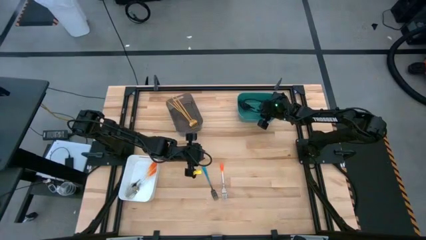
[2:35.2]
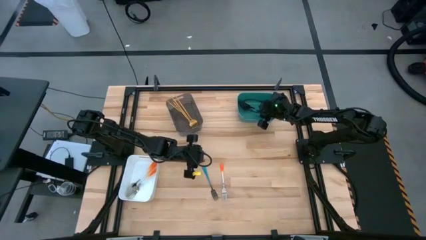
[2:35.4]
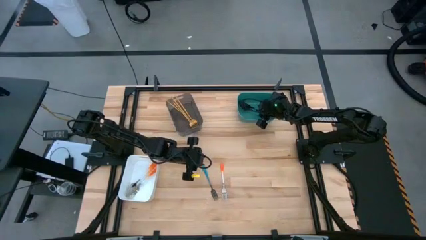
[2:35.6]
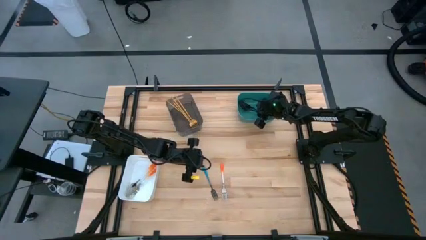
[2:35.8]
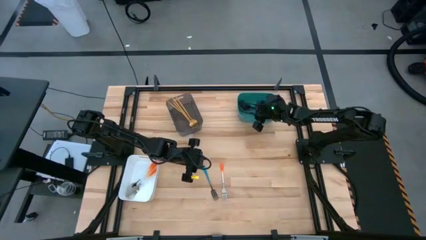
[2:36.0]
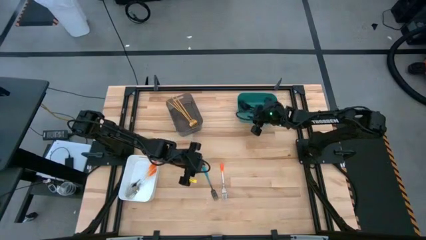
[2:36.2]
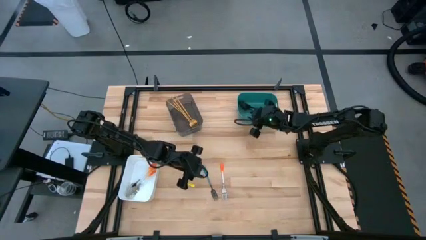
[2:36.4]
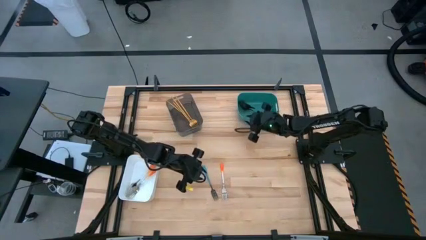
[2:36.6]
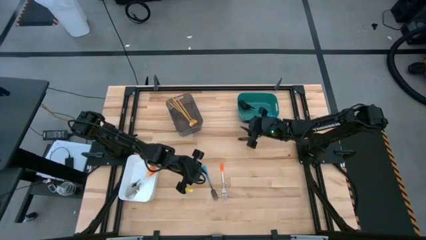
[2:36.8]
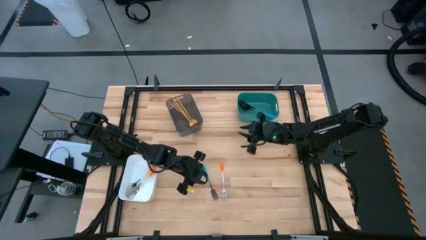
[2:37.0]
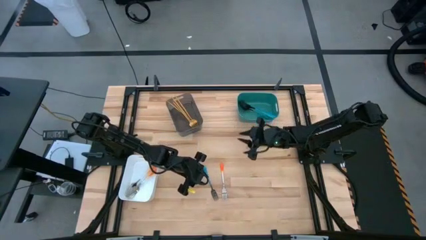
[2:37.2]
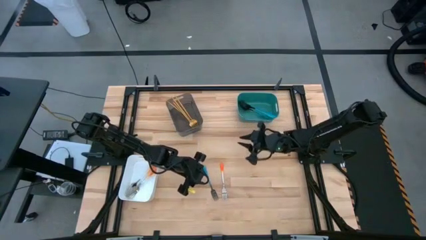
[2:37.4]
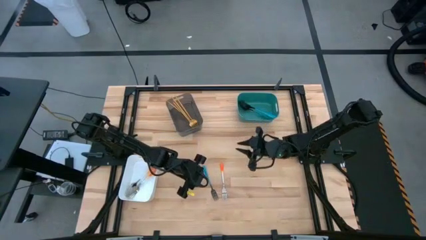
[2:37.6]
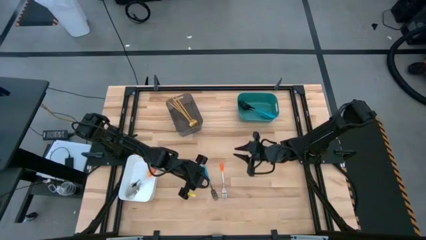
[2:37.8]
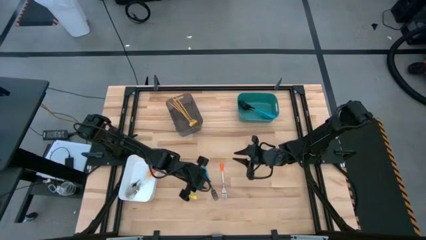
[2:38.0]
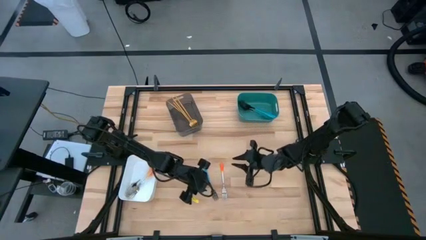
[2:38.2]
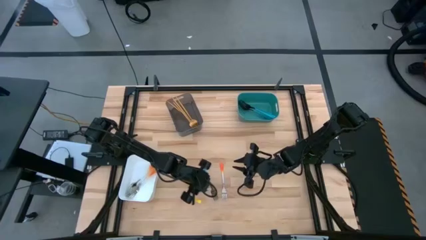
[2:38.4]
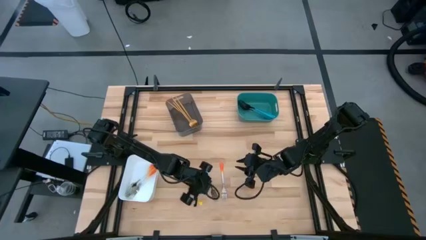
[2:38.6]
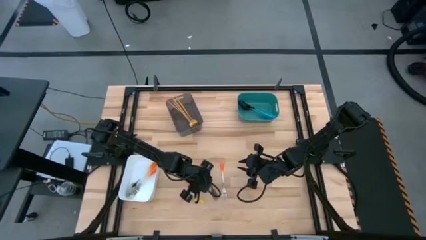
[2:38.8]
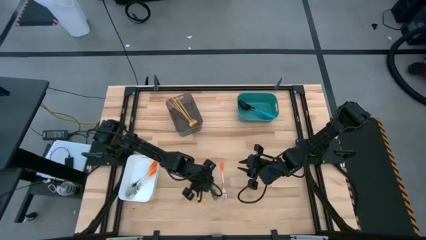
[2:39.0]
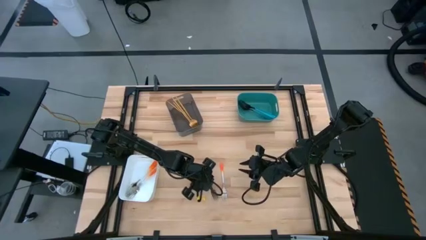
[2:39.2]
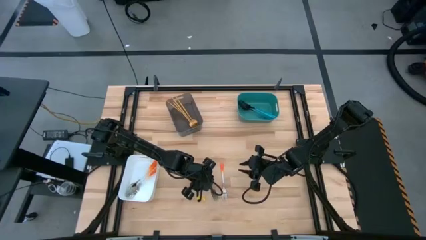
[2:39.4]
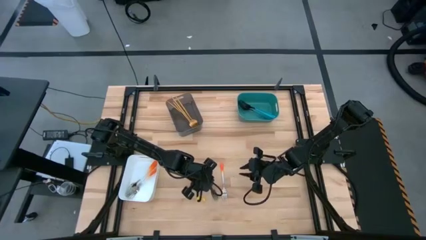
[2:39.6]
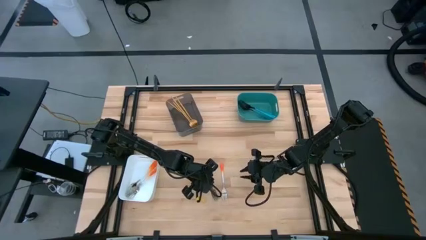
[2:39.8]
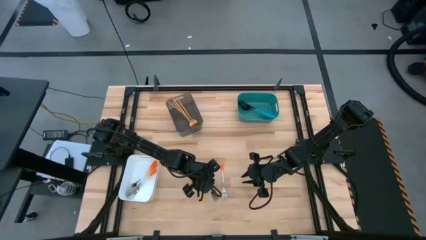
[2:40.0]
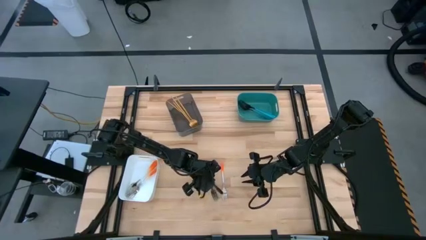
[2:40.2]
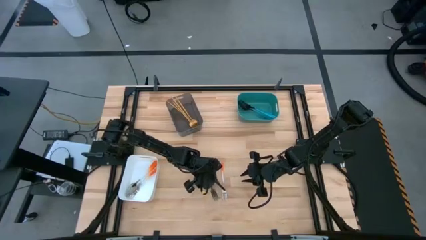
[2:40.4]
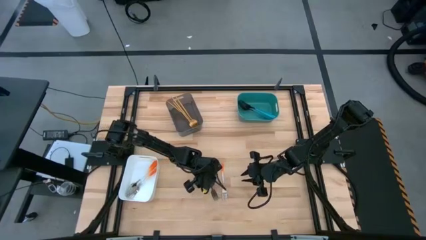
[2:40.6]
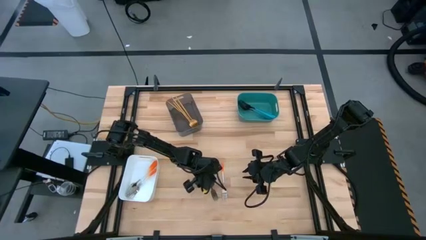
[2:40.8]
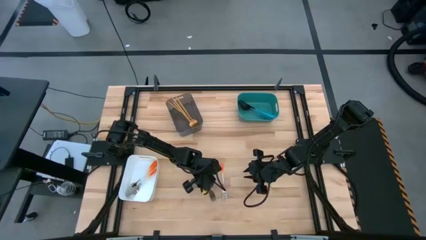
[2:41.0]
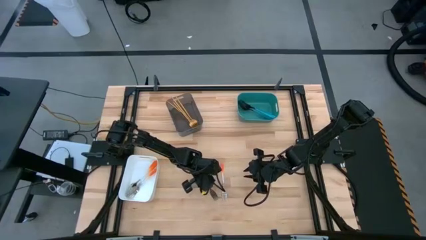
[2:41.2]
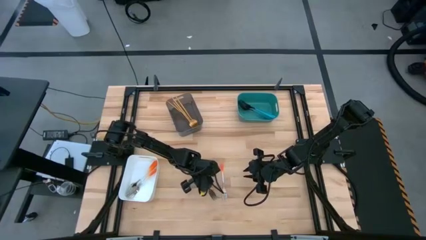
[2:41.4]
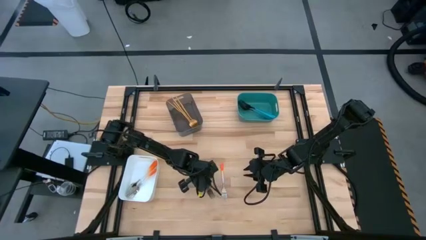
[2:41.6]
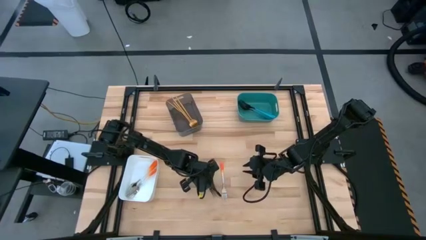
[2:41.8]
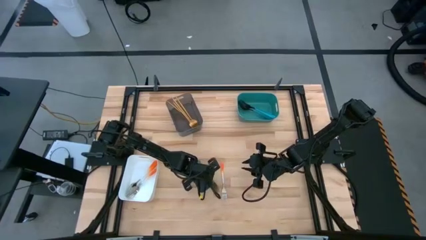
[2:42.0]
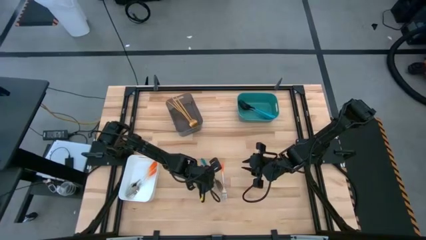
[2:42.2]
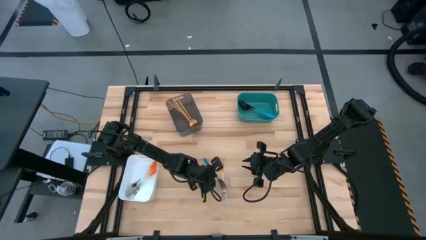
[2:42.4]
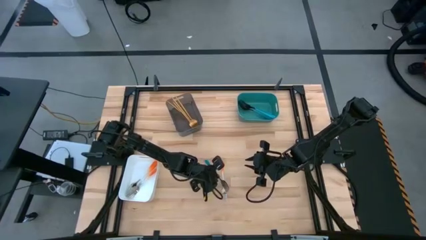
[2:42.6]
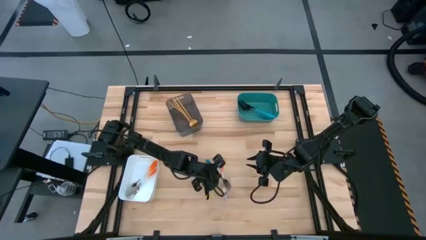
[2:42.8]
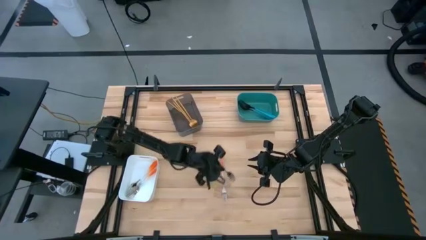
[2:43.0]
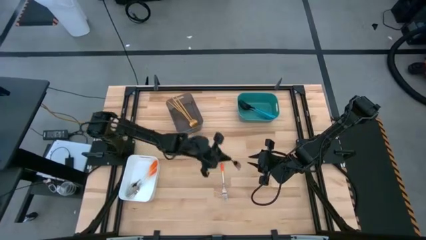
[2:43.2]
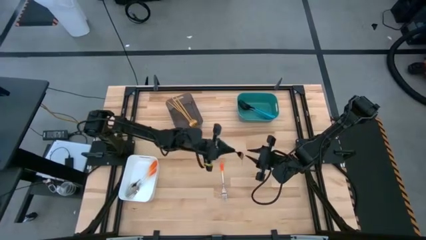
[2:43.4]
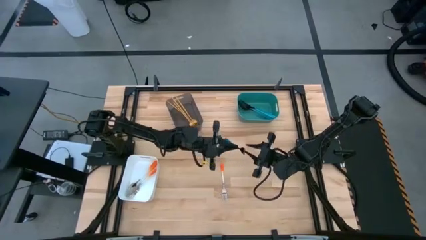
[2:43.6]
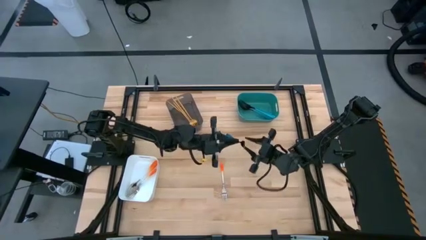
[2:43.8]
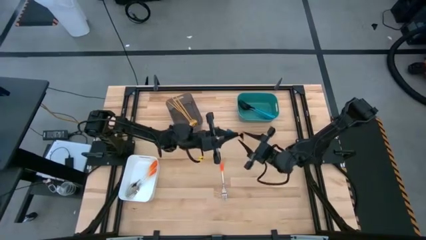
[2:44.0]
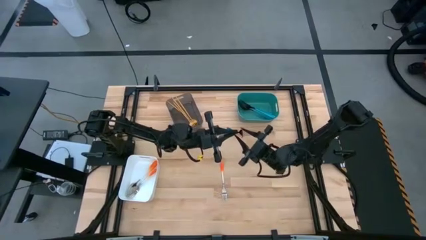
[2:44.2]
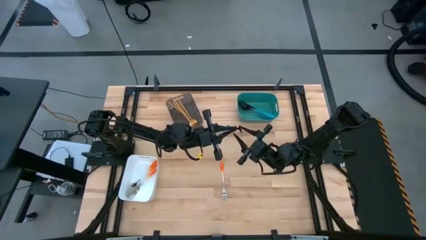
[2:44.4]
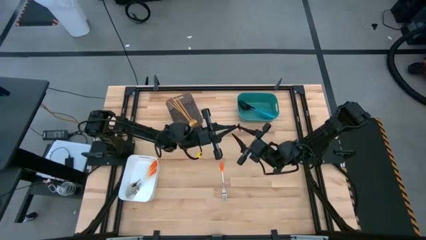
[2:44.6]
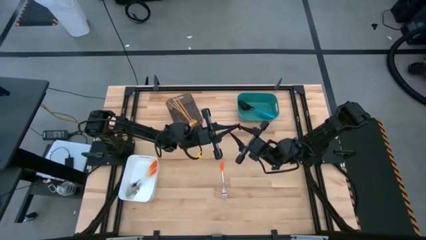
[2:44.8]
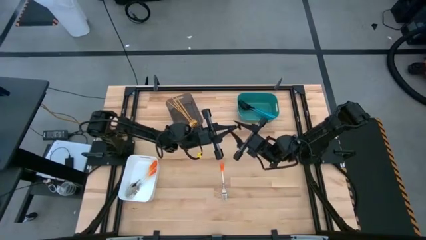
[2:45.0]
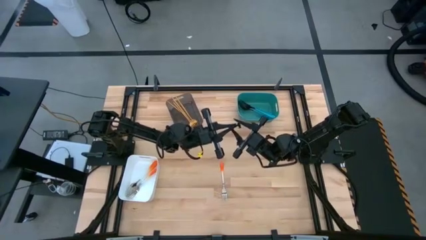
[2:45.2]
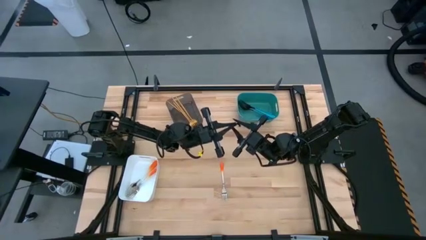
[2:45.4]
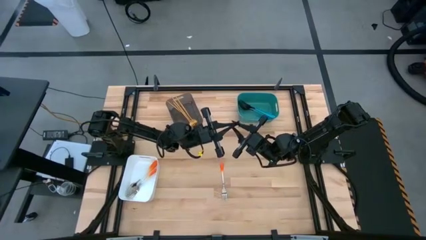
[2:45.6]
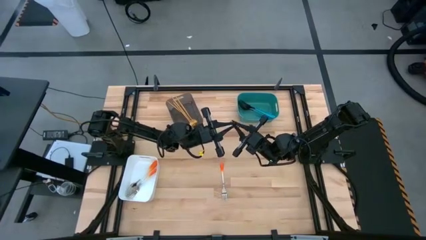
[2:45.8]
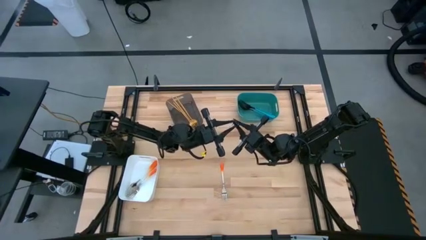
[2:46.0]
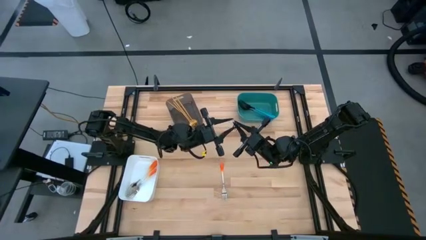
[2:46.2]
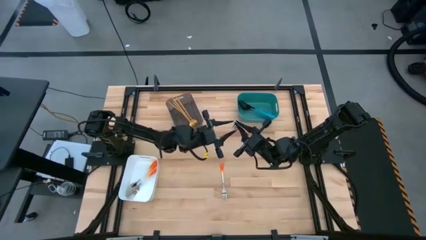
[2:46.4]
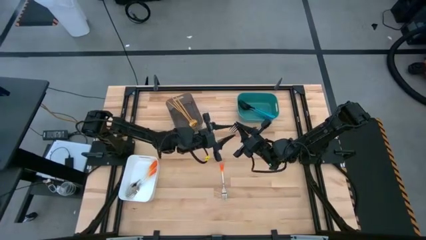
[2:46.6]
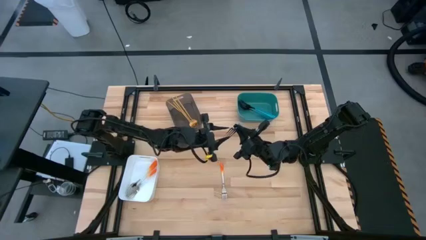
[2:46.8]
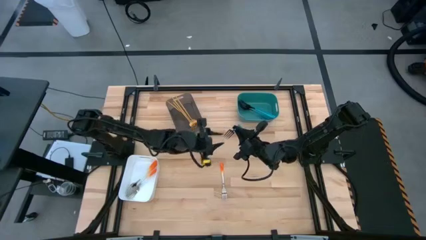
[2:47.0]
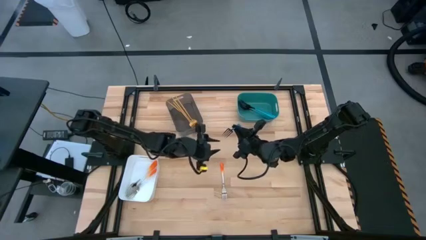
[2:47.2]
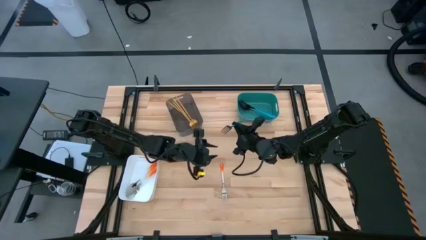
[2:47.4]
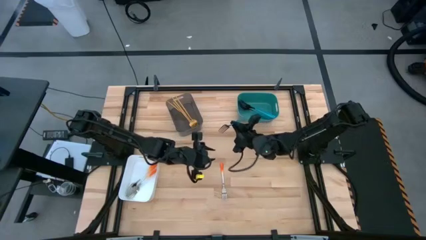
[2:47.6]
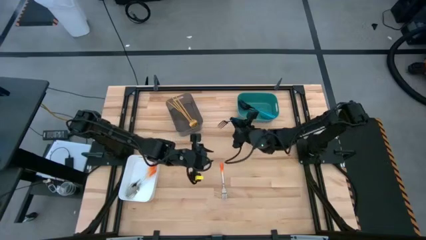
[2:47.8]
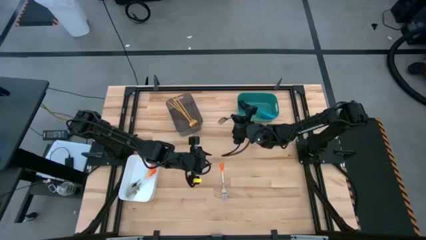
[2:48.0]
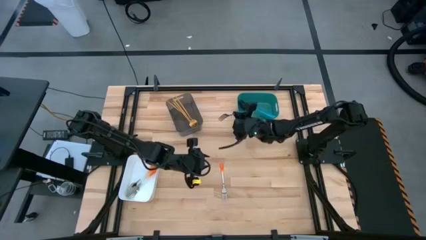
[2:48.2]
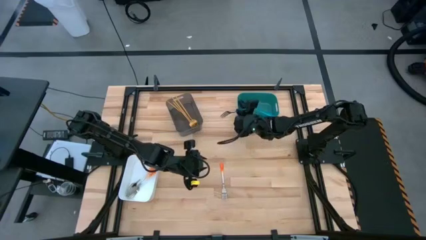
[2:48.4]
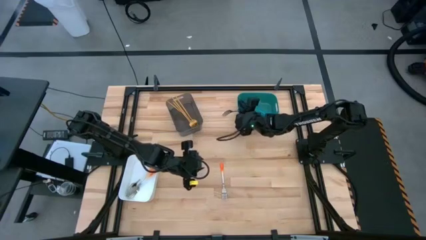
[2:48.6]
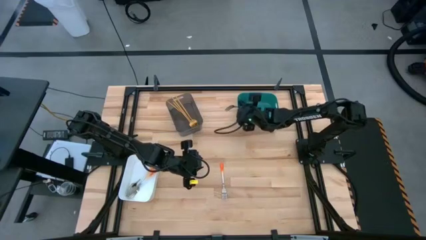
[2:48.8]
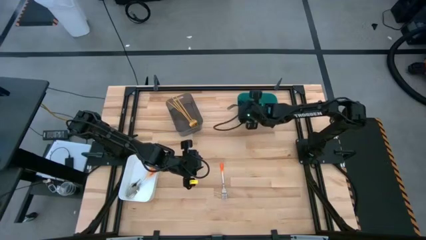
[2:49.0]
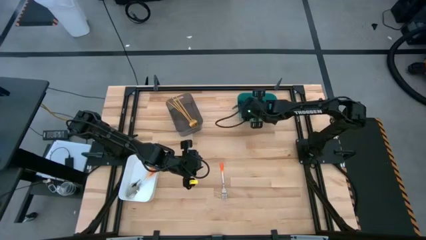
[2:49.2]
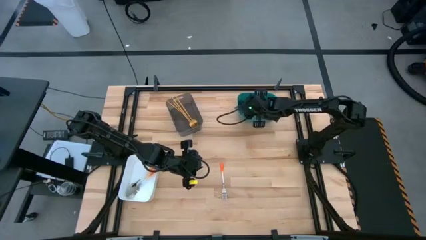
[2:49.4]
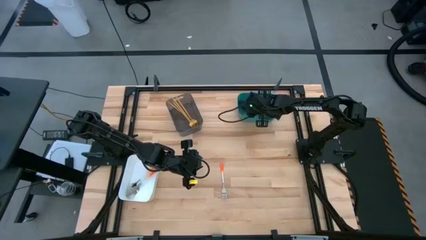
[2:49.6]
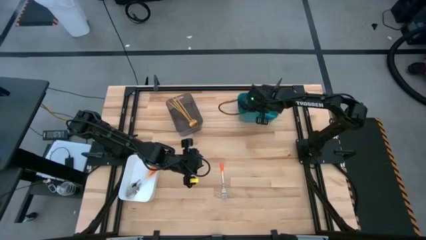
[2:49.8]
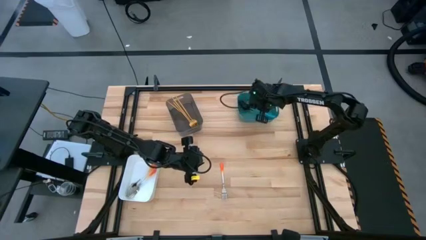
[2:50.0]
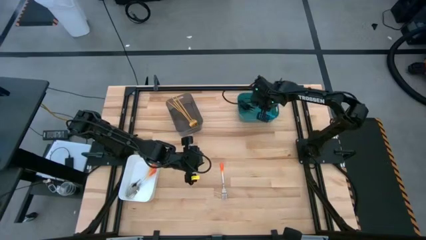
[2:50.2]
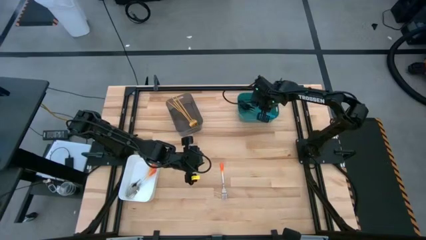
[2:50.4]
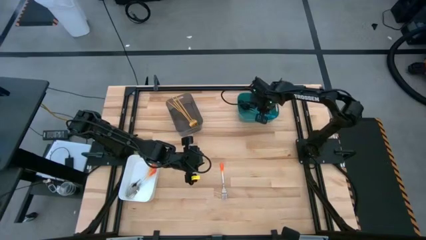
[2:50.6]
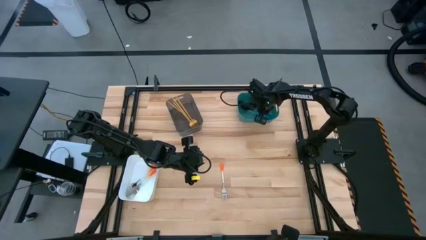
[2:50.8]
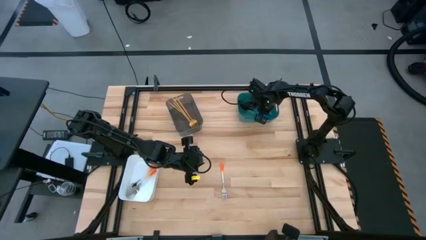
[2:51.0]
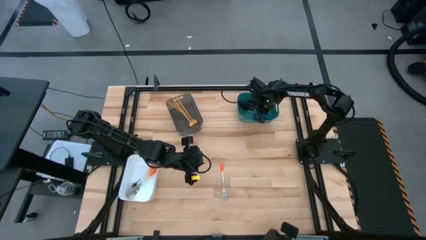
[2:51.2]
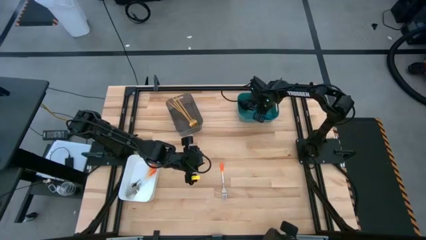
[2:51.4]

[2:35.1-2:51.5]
Task: Sort silverware by color (type)
Put the blue fork into the green bin
